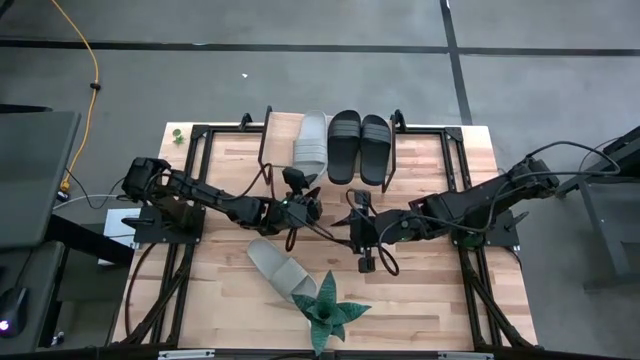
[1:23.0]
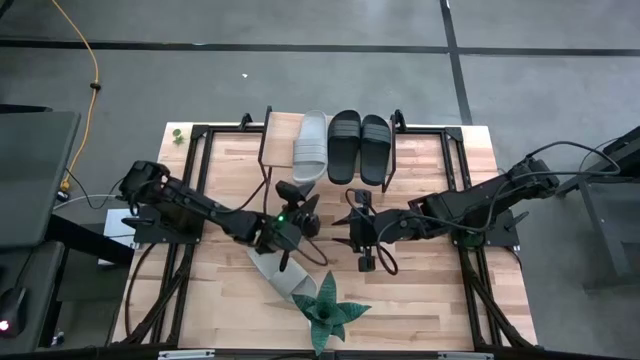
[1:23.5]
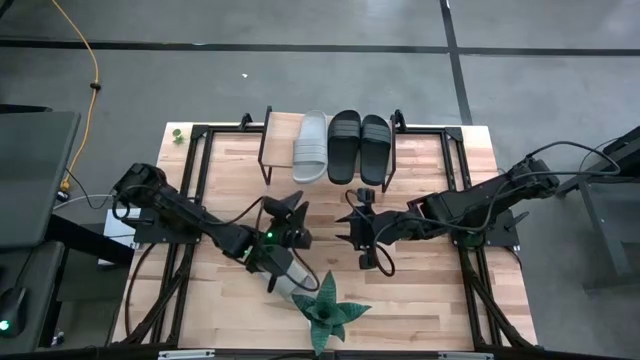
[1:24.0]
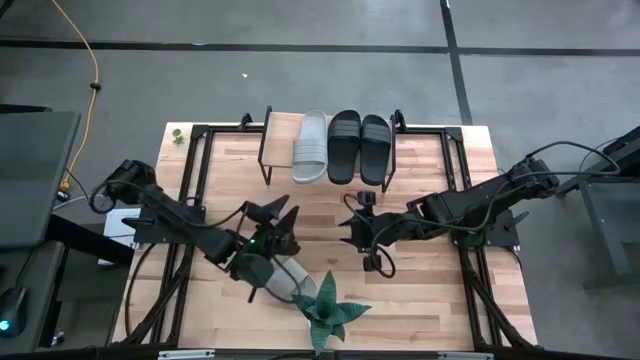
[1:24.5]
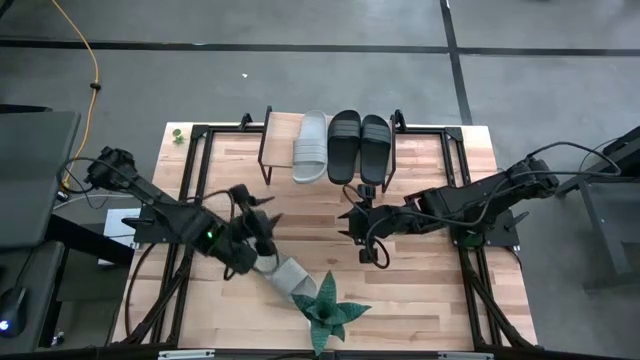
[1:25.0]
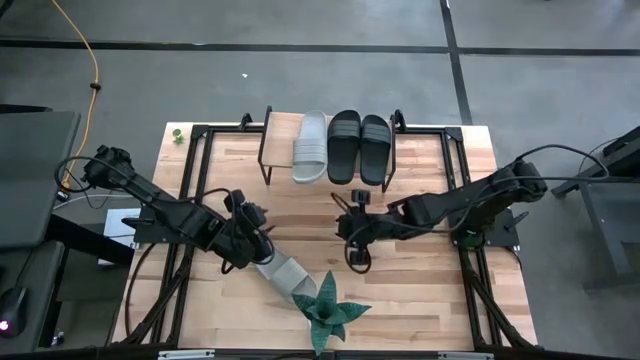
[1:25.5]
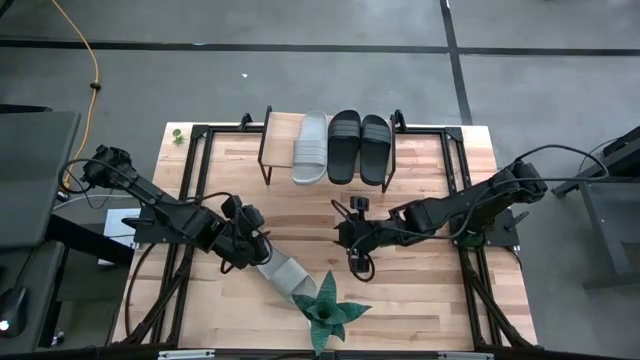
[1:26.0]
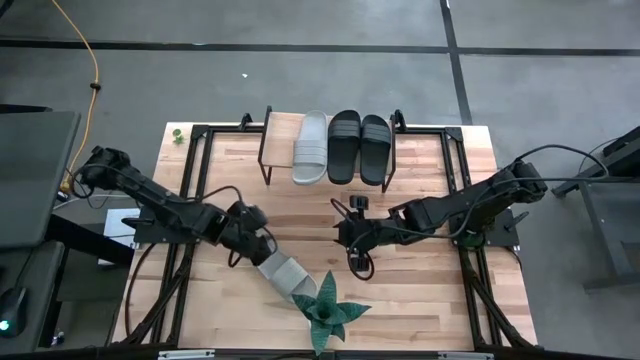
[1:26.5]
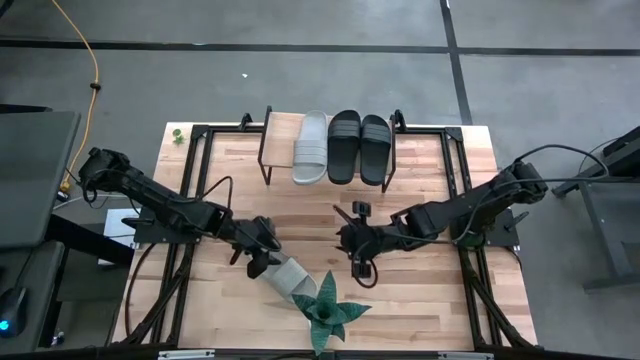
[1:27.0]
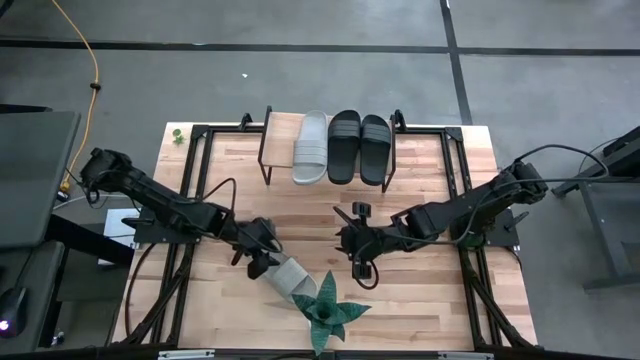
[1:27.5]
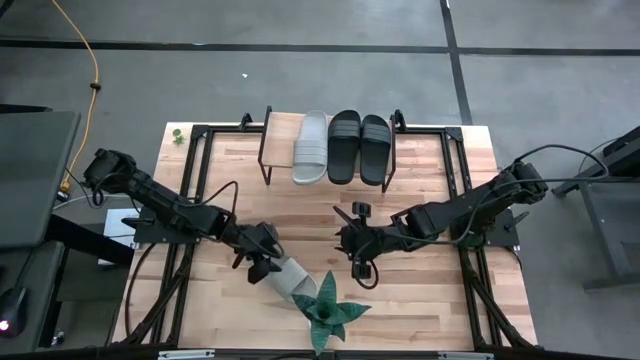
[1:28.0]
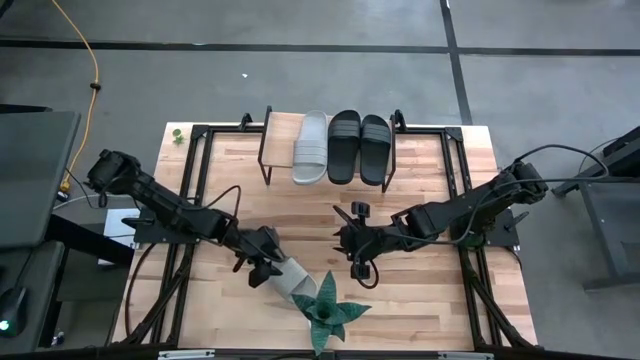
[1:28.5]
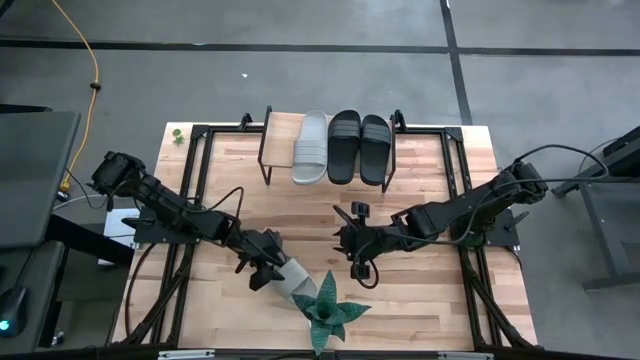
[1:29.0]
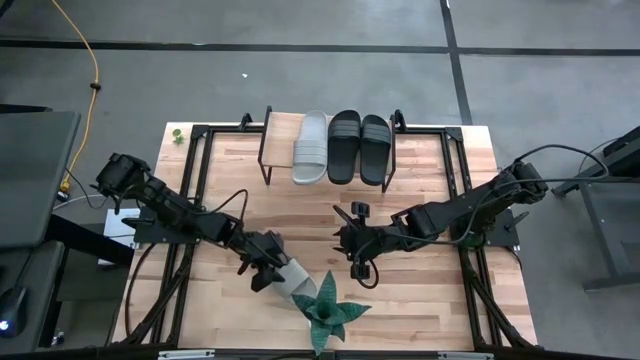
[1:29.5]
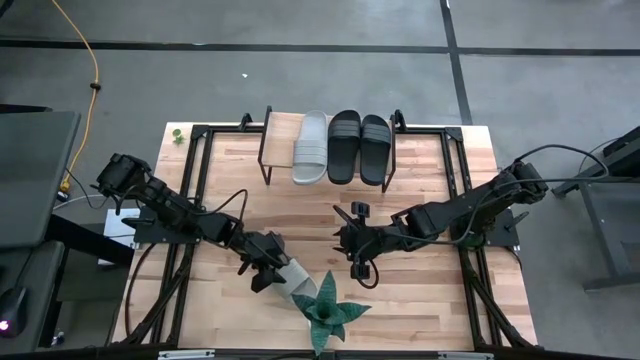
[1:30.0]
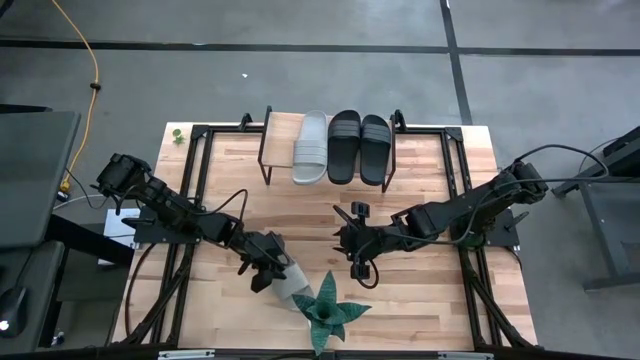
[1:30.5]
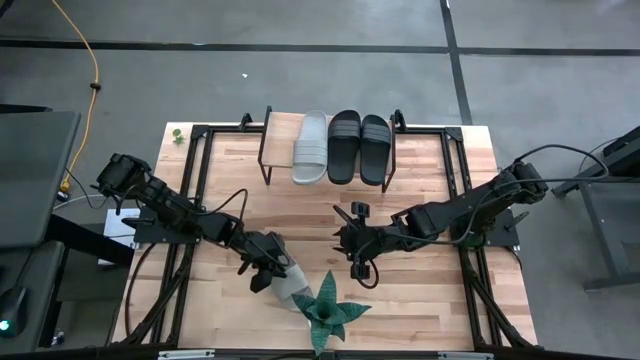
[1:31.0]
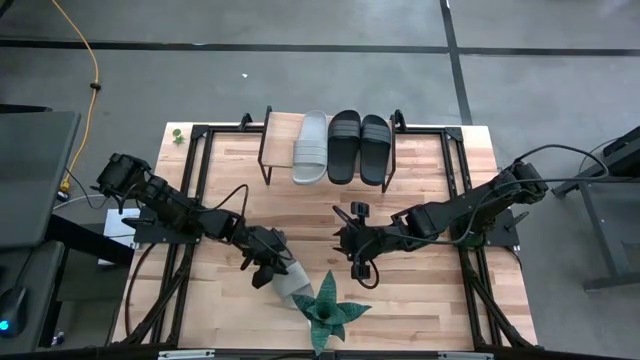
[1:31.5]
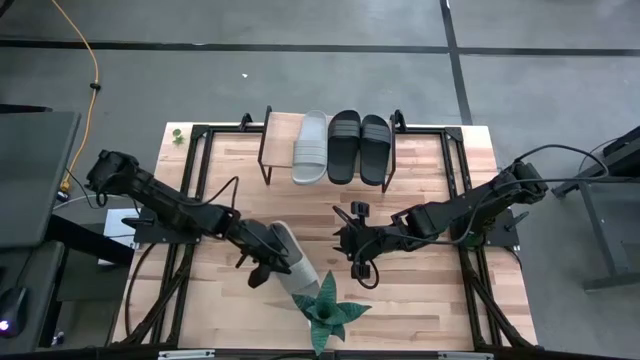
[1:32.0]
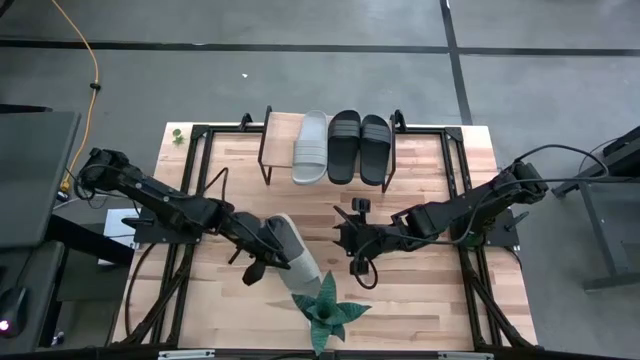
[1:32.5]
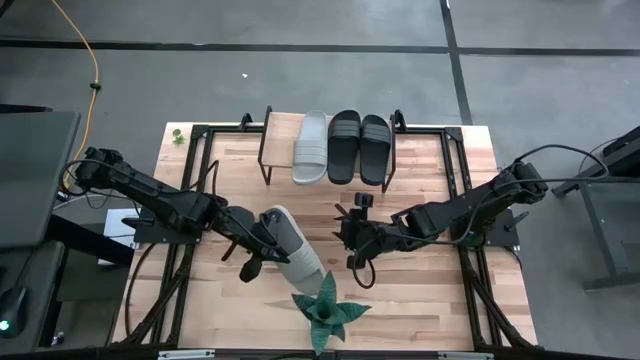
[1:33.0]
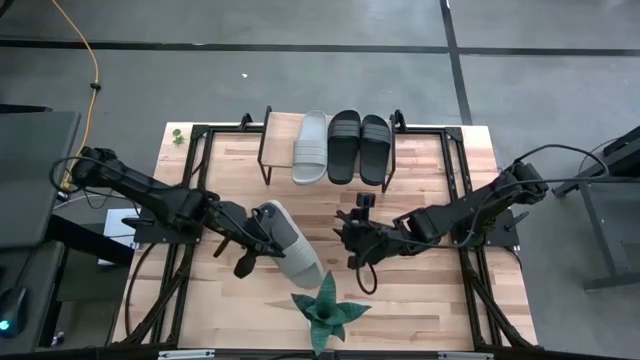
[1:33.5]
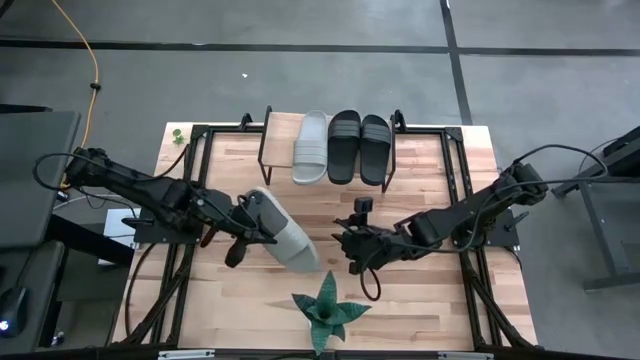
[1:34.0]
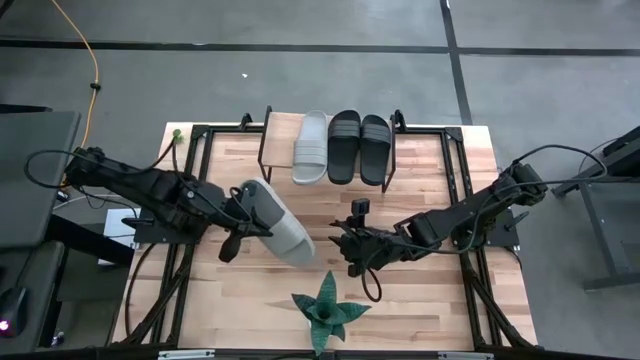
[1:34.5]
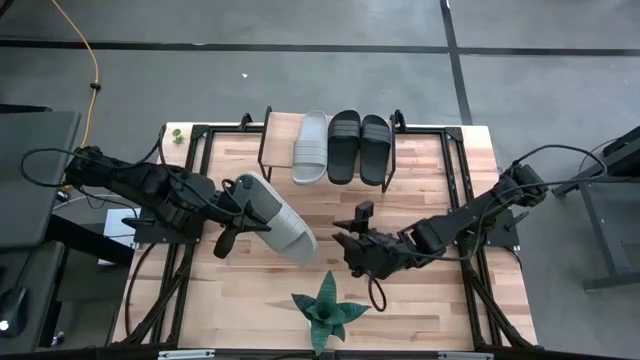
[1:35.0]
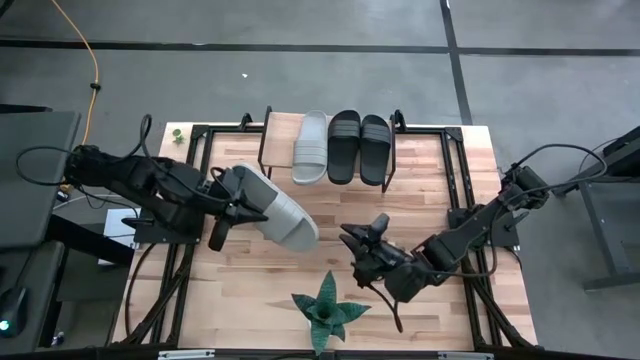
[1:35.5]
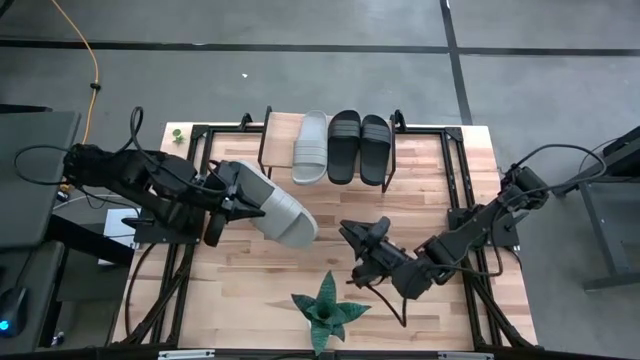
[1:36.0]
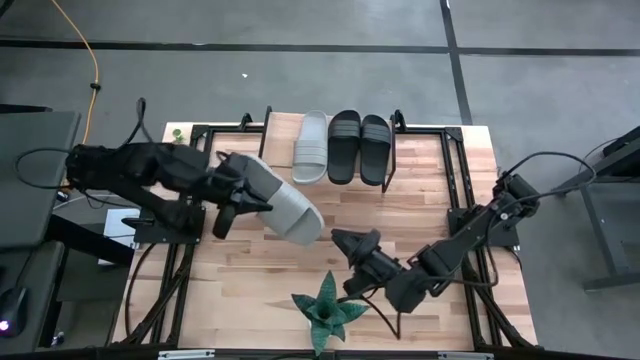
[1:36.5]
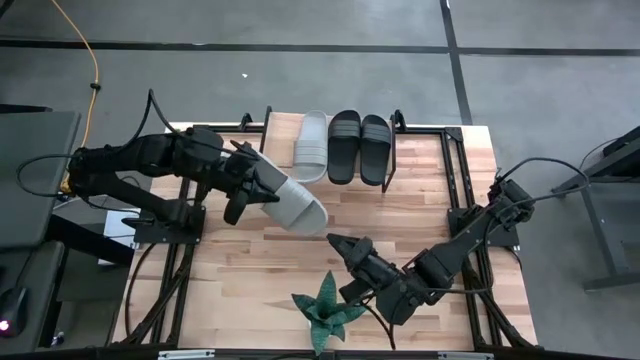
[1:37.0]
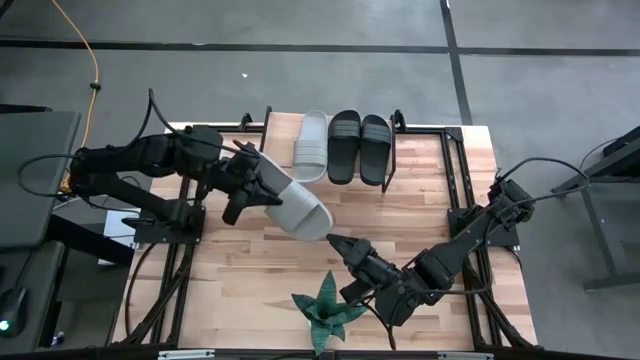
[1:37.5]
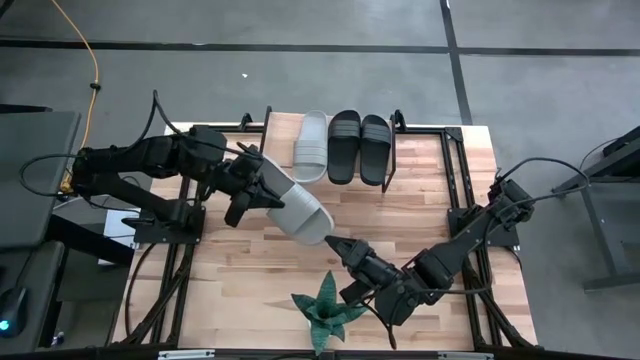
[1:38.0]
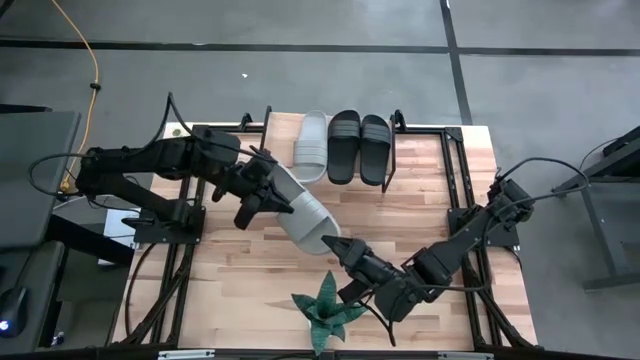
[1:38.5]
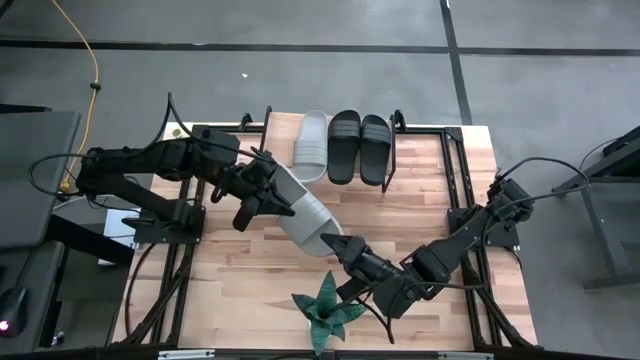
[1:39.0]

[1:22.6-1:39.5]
Task: Pick and place slides into the shelf
Put the gray slipper on the shelf

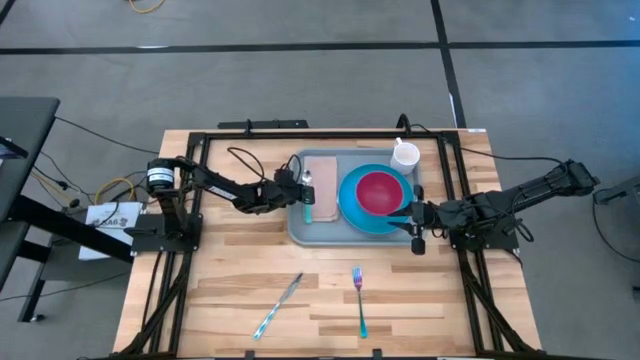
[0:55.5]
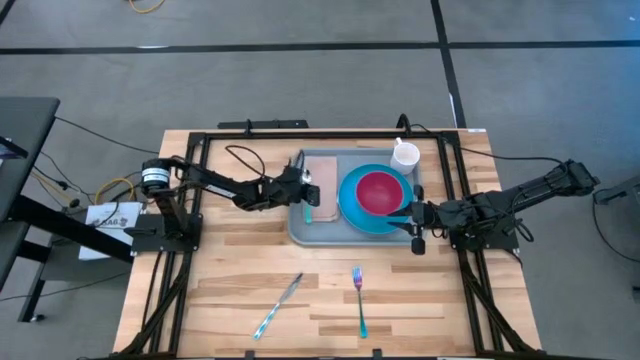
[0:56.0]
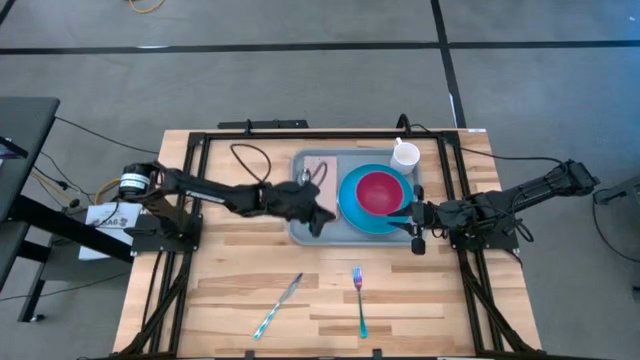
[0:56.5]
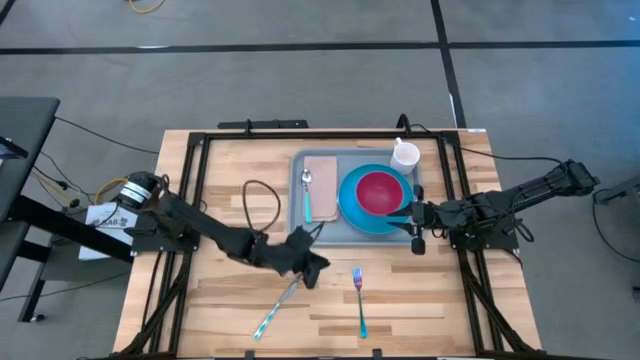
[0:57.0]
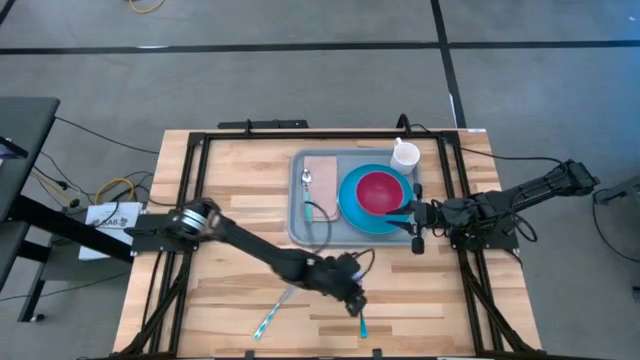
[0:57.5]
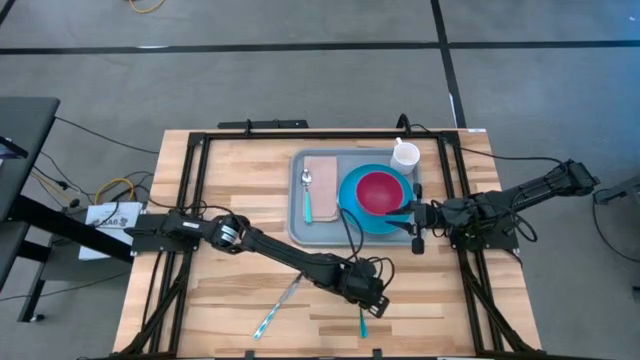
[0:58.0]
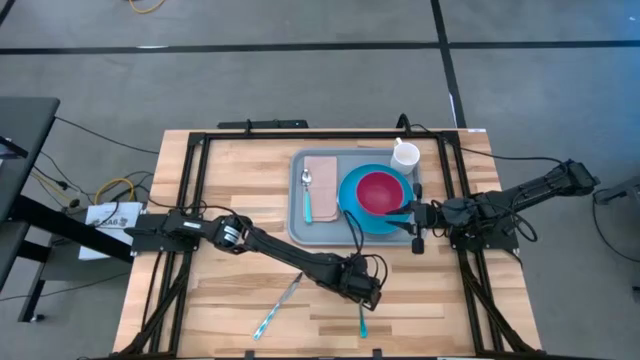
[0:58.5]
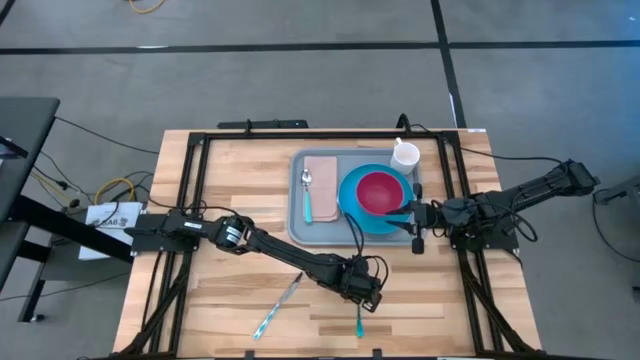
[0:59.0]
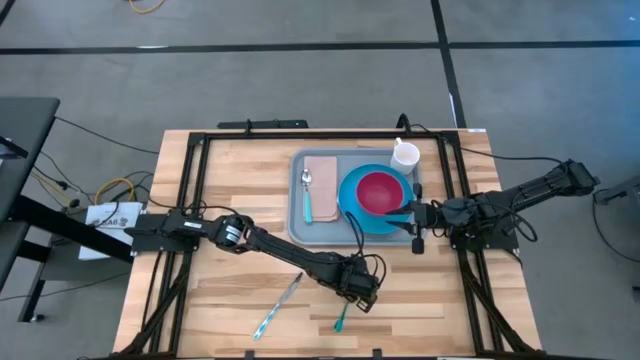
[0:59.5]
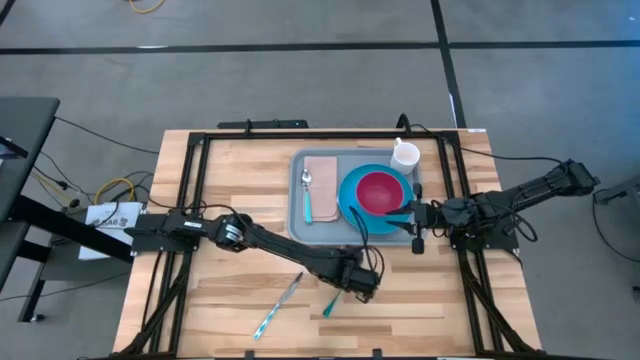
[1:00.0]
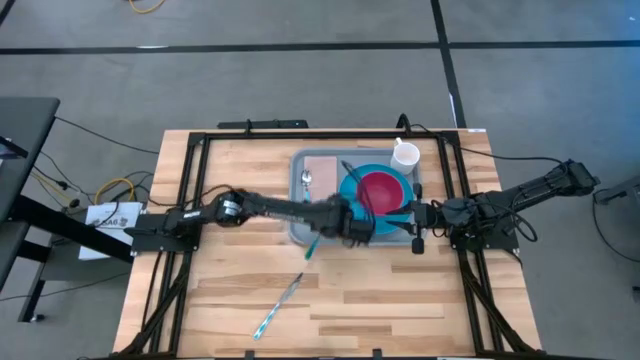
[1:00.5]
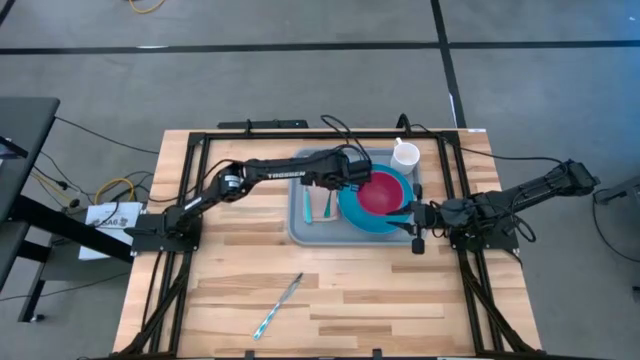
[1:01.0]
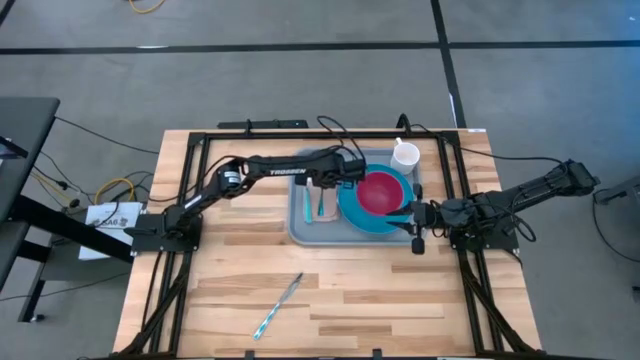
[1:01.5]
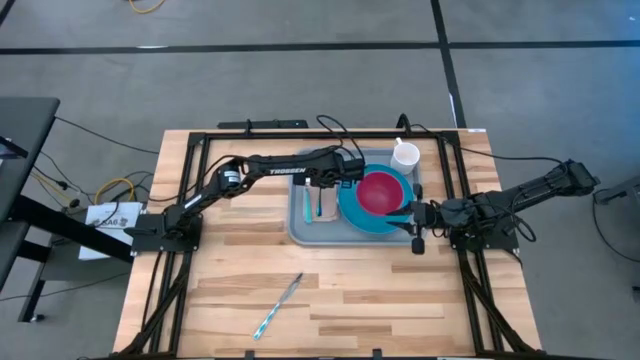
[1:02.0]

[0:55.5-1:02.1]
Task: Set up tray
Put the blue fork to the right of the green spoon on the light brown napkin on the gray serving tray
